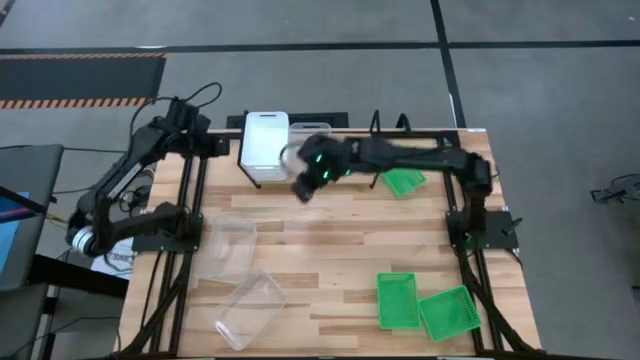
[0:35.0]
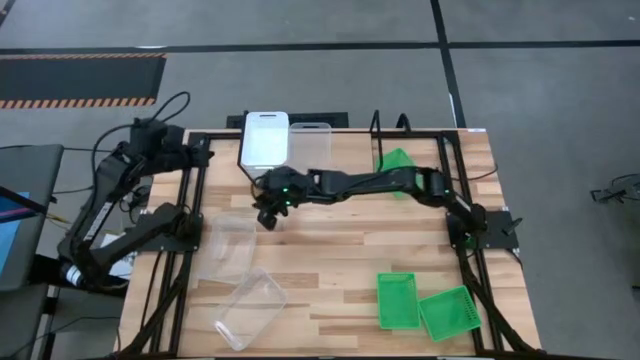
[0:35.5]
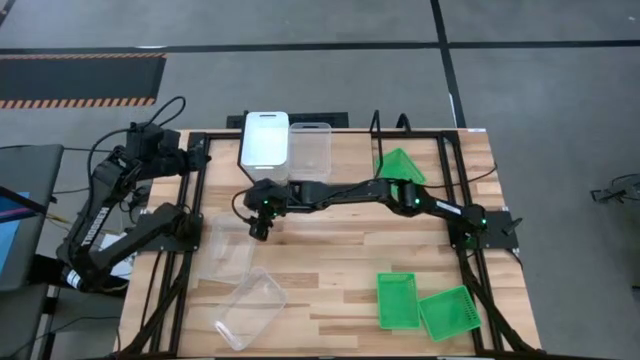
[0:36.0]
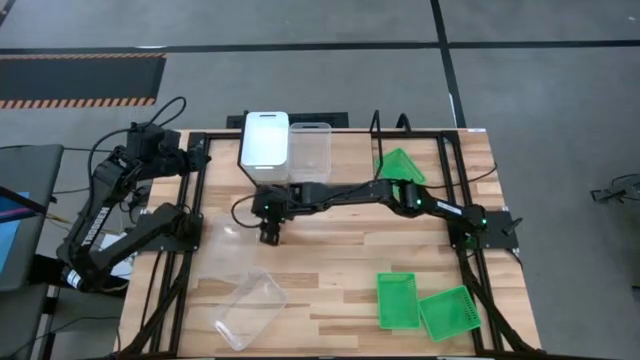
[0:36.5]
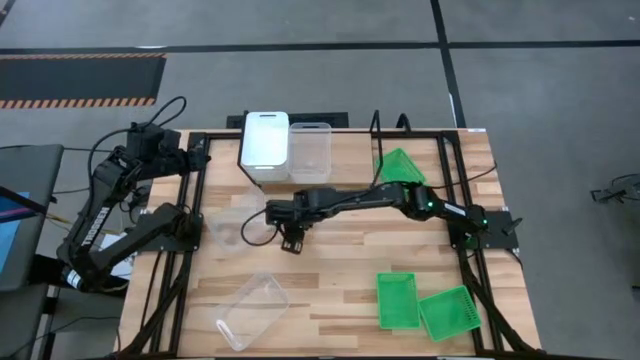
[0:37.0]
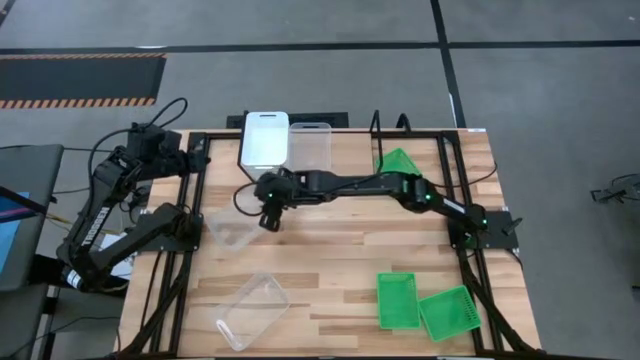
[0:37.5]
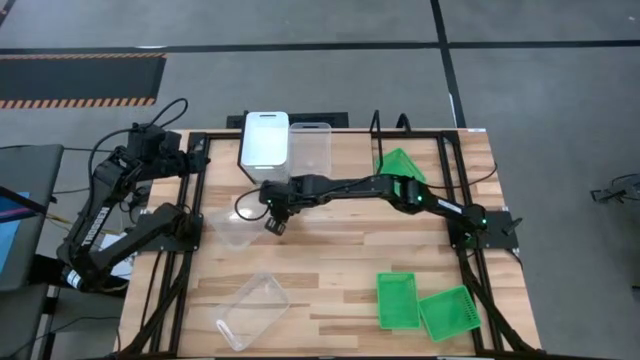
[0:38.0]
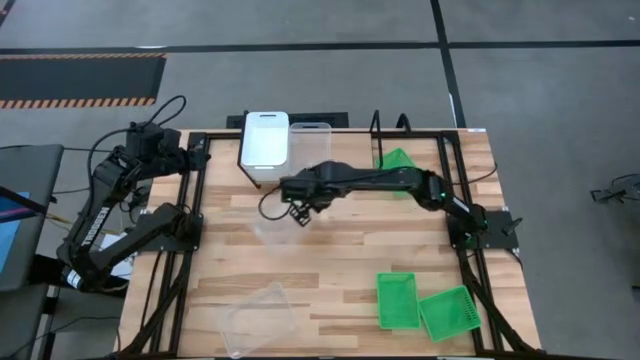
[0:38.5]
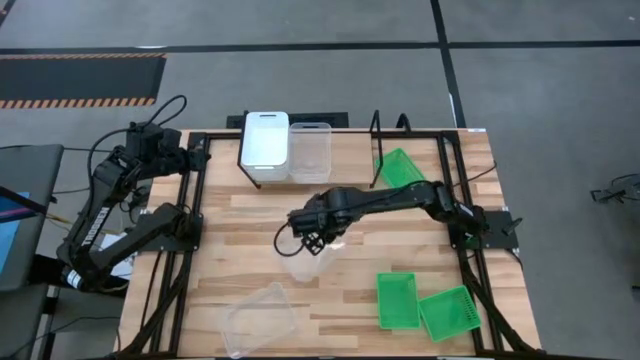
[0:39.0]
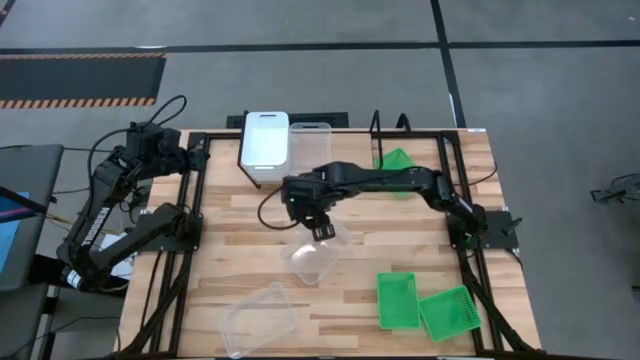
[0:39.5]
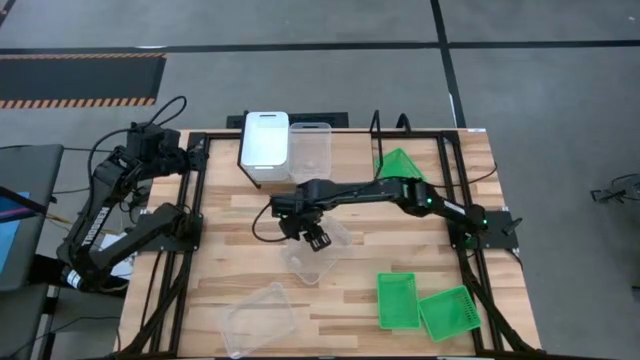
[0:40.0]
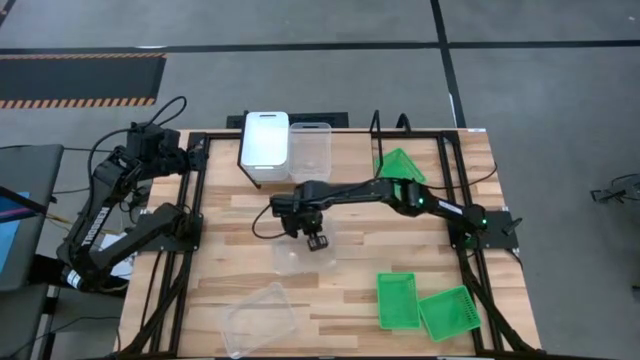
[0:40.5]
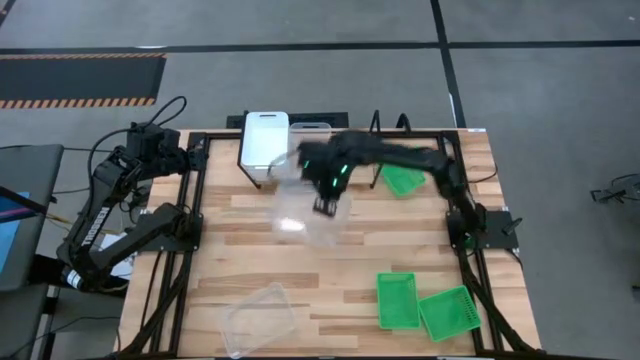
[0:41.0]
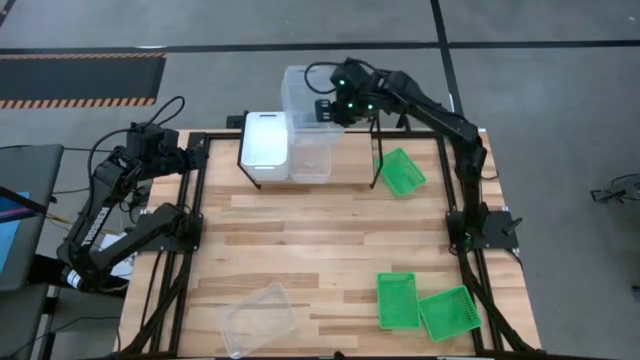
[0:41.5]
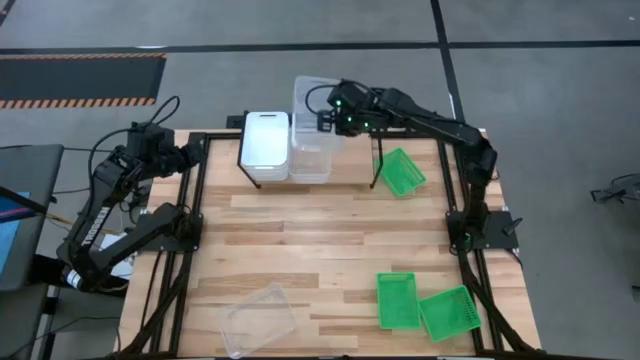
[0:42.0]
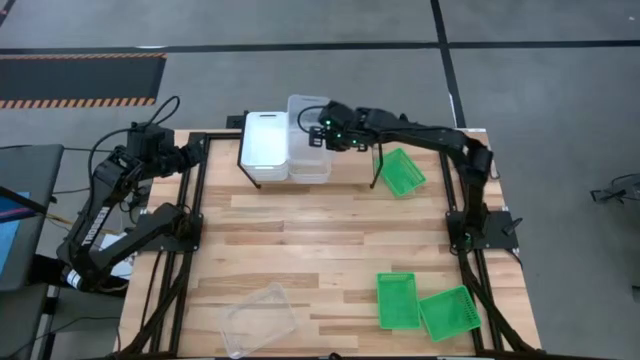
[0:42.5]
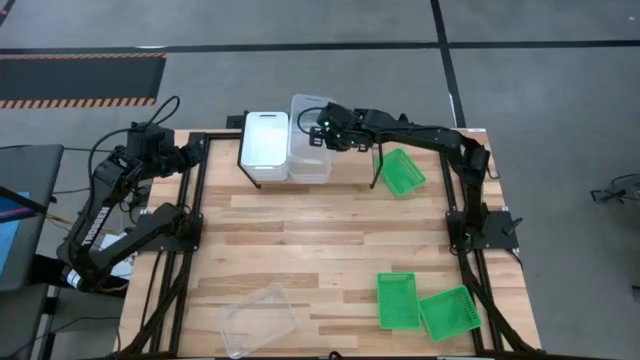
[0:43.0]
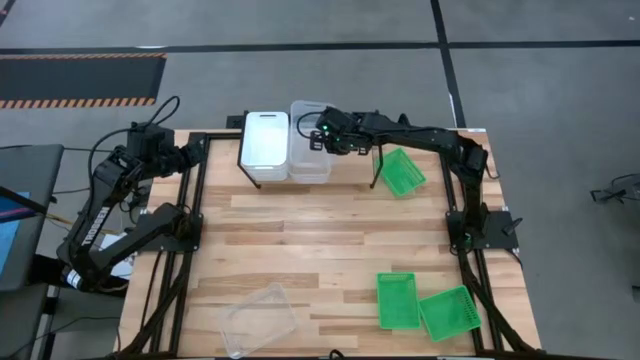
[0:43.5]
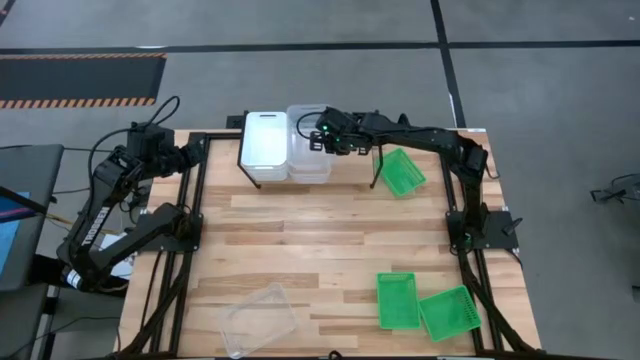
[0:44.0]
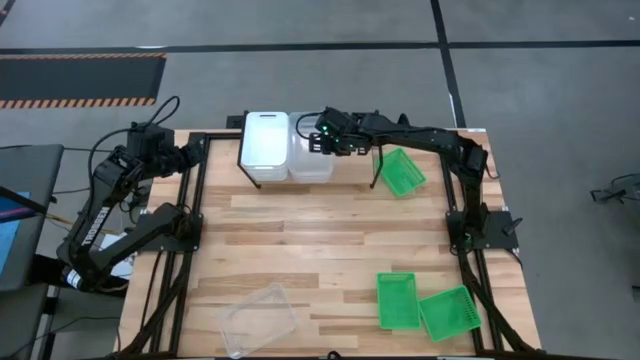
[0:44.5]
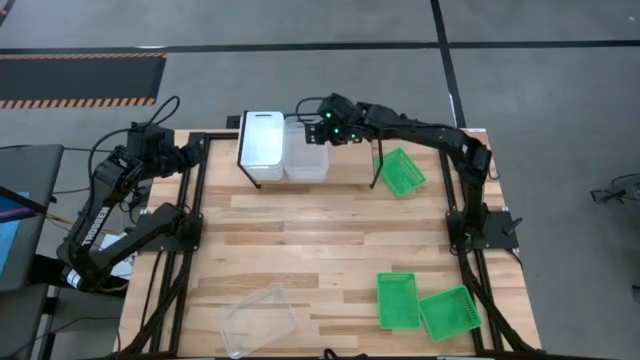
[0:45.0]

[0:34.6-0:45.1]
Task: Stack baskets on shelf by color
Stack the top transparent bin on top of the transparent bin on the shelf

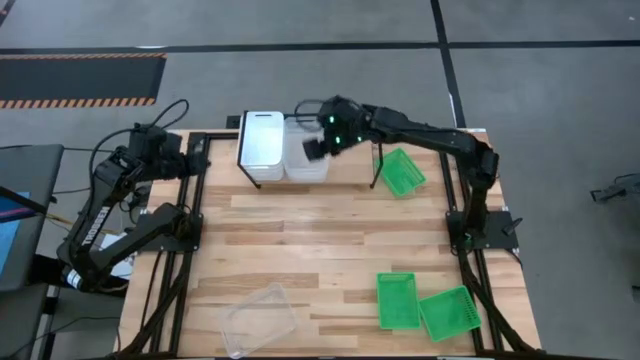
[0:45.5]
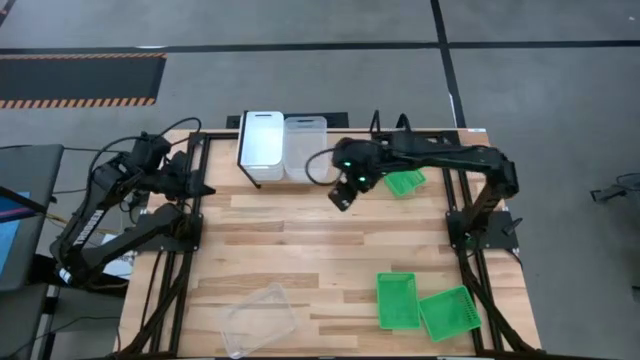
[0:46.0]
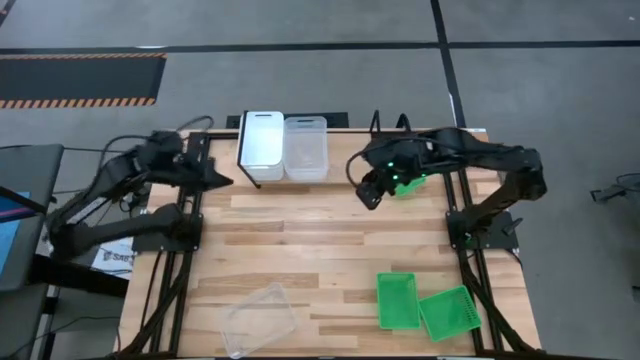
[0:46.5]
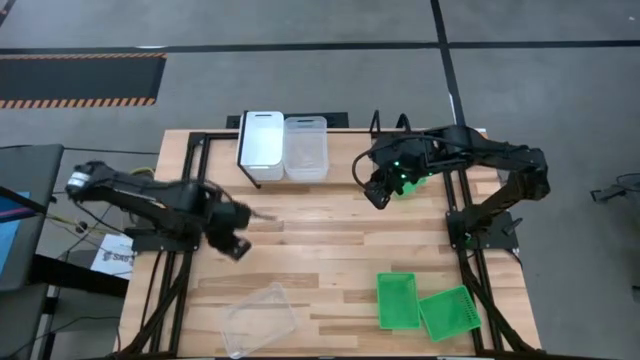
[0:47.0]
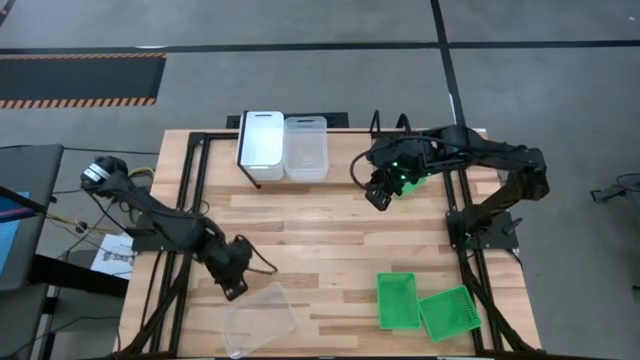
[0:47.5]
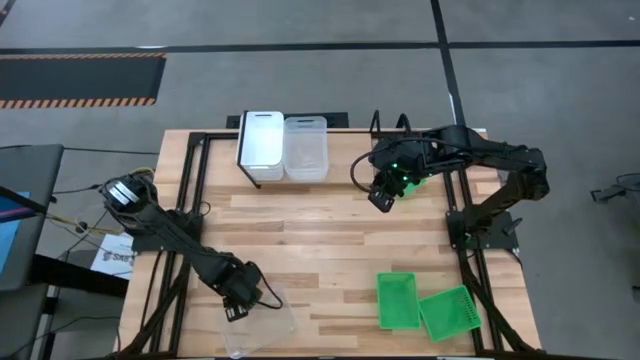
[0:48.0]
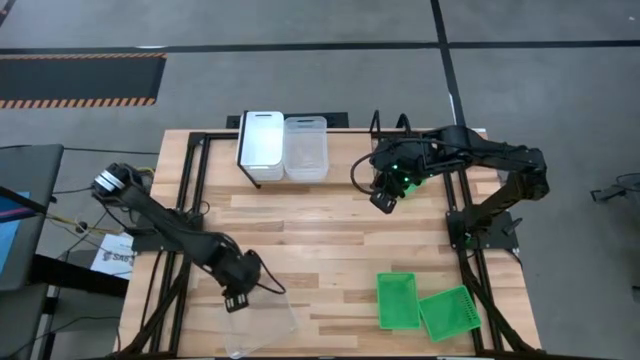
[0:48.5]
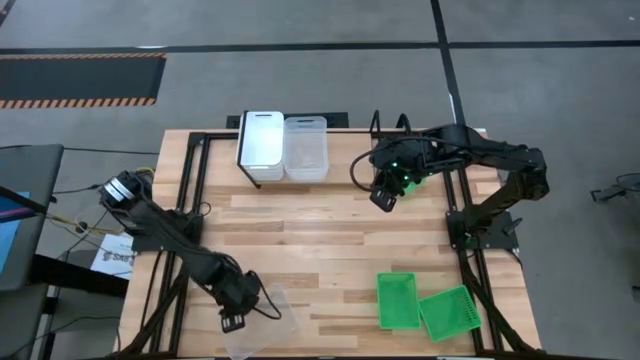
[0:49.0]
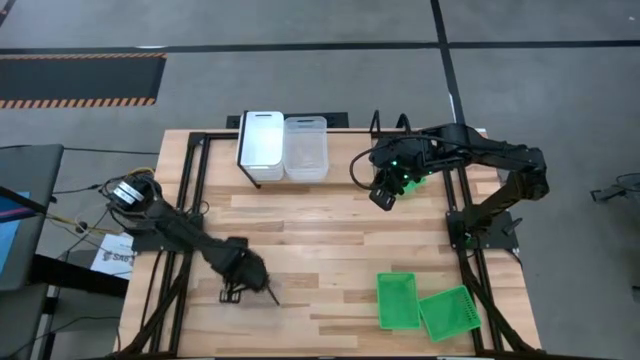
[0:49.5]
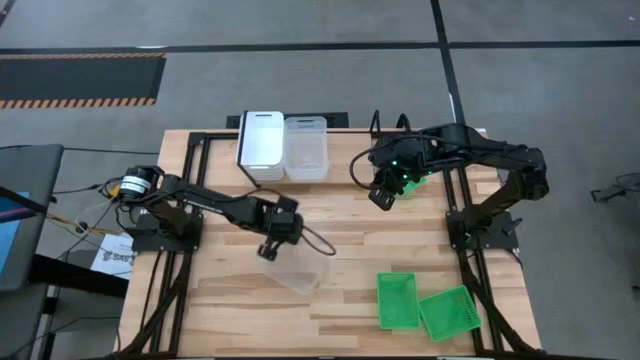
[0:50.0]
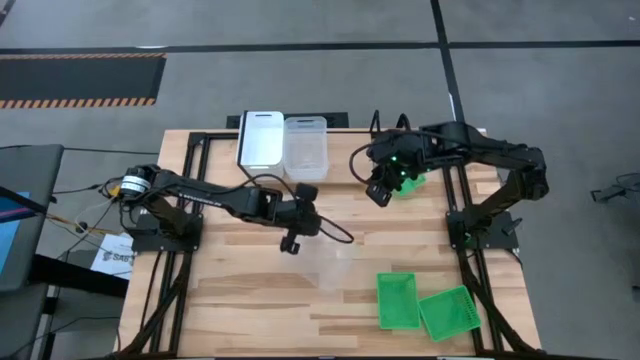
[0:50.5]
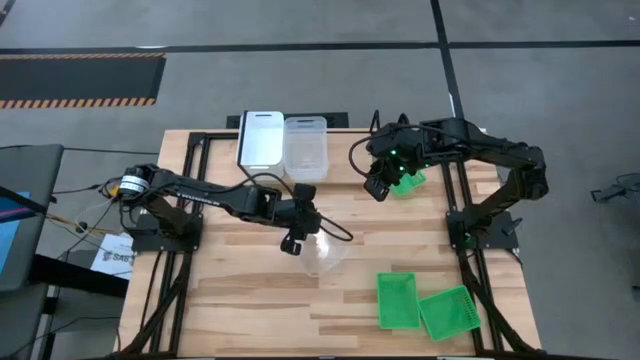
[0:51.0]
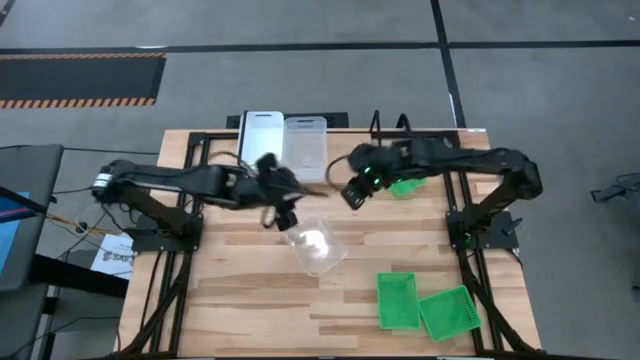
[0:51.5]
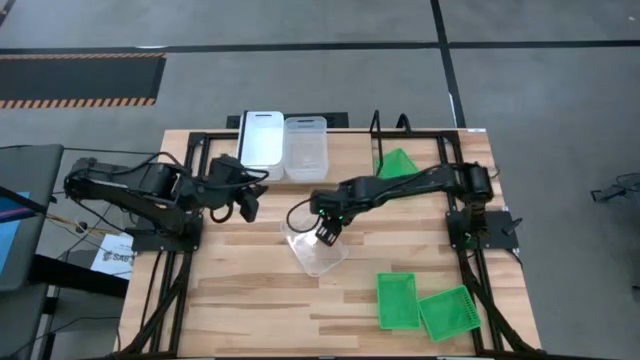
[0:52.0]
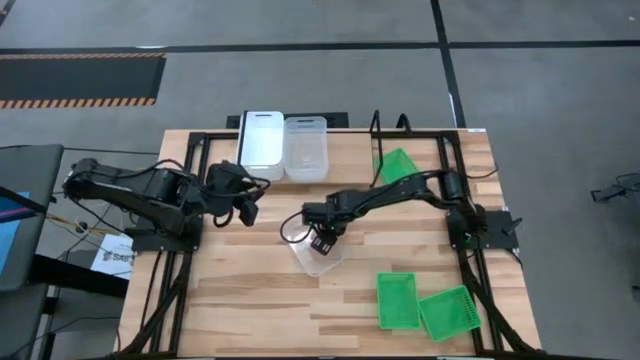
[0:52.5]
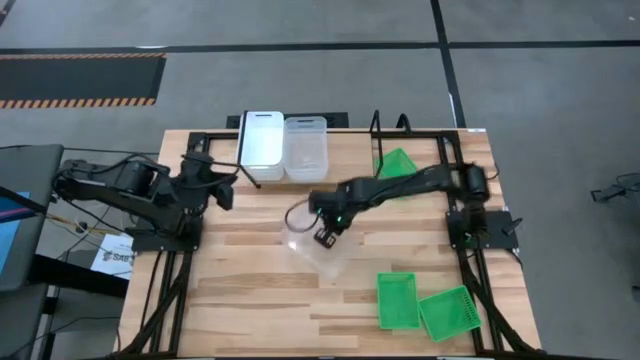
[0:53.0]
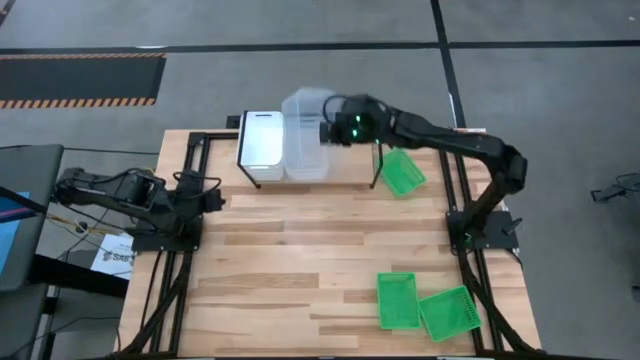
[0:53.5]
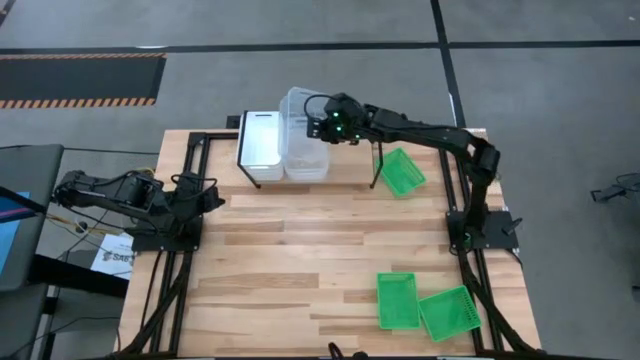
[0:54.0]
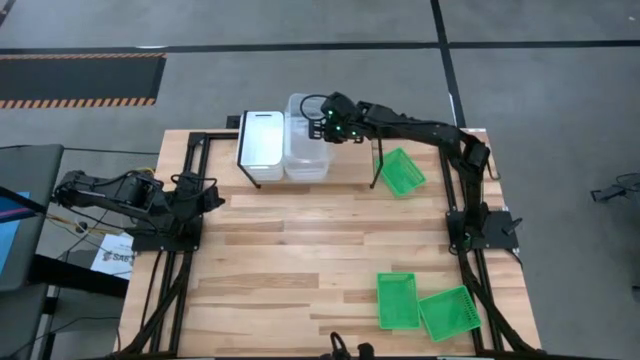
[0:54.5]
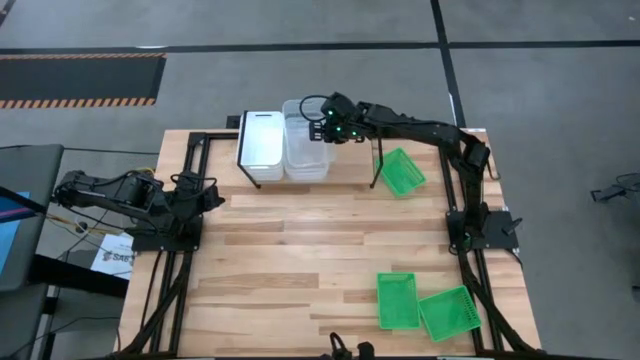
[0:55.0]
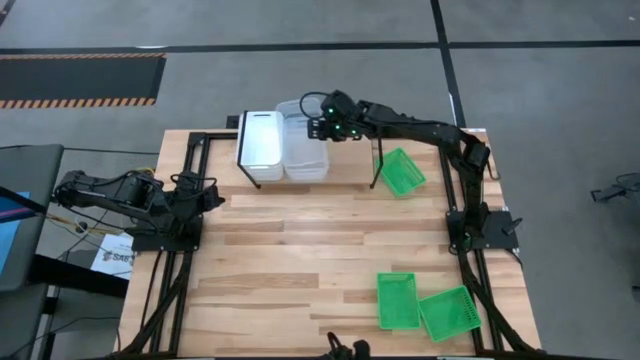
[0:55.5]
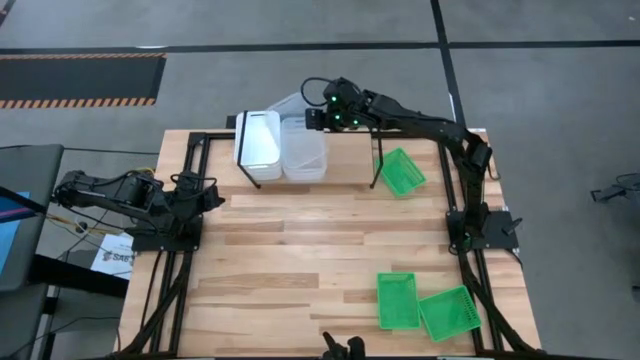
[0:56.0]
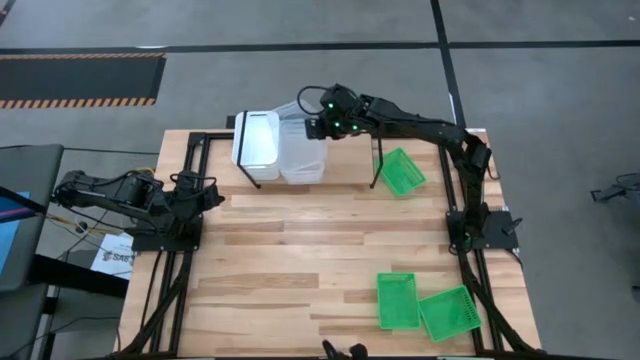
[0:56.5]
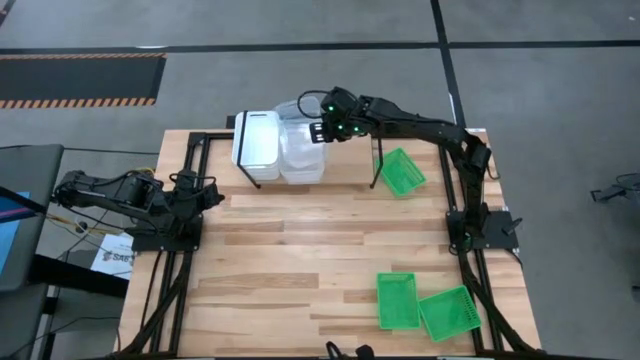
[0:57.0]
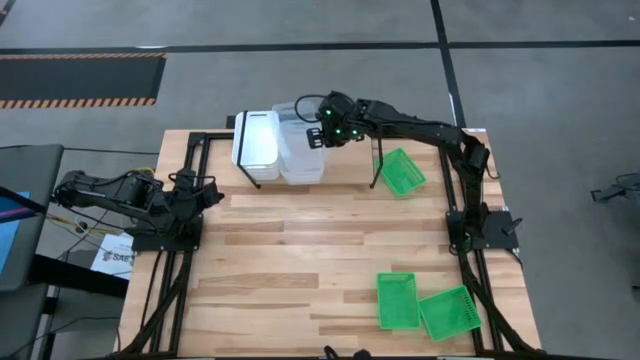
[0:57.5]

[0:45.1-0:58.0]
Stack the transparent bin on top of the transparent bins on the shelf
